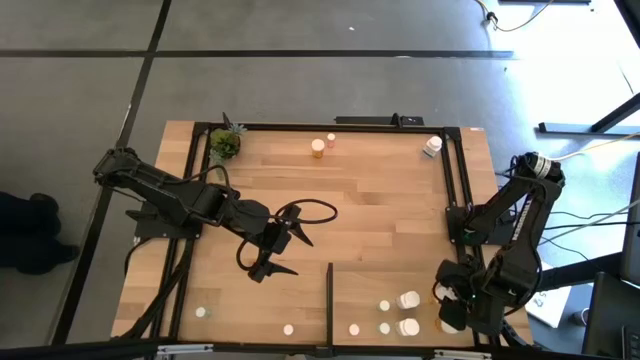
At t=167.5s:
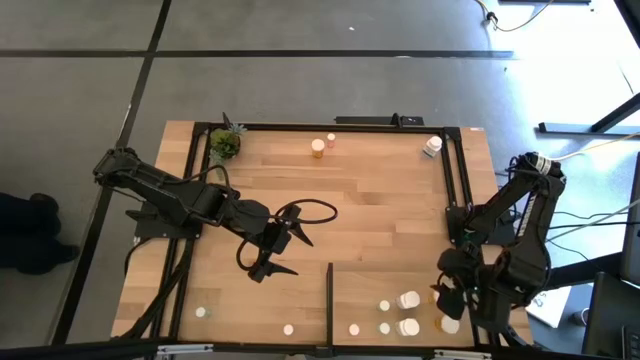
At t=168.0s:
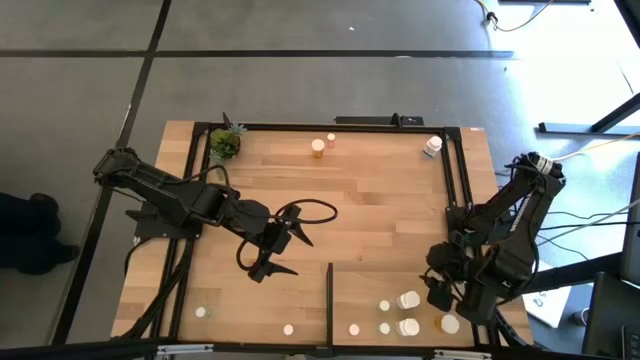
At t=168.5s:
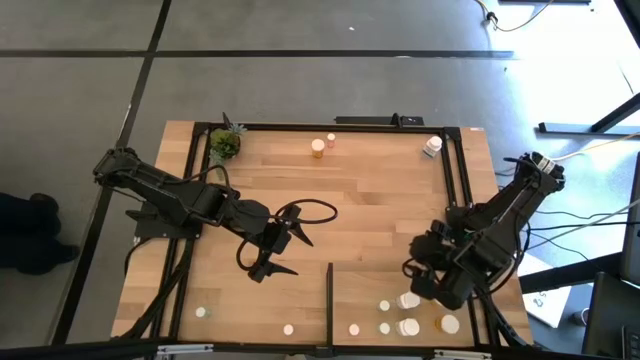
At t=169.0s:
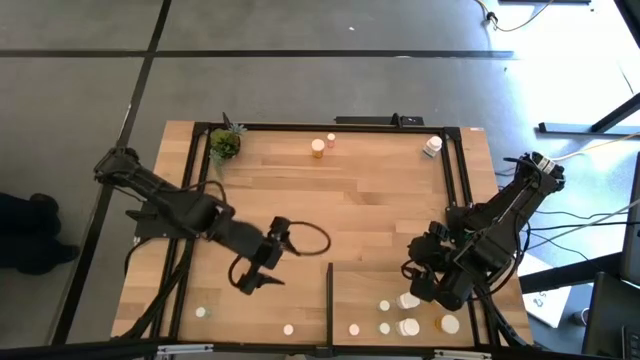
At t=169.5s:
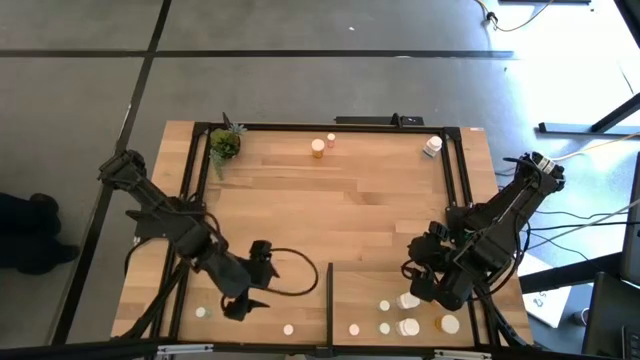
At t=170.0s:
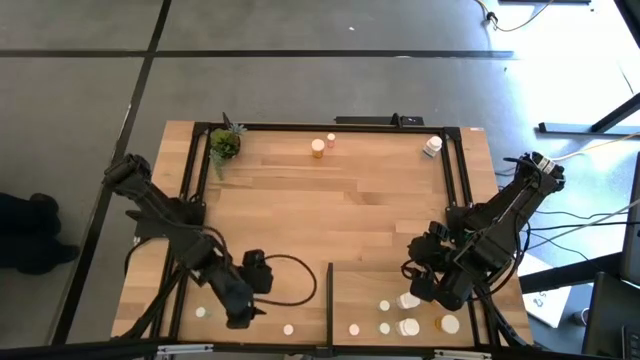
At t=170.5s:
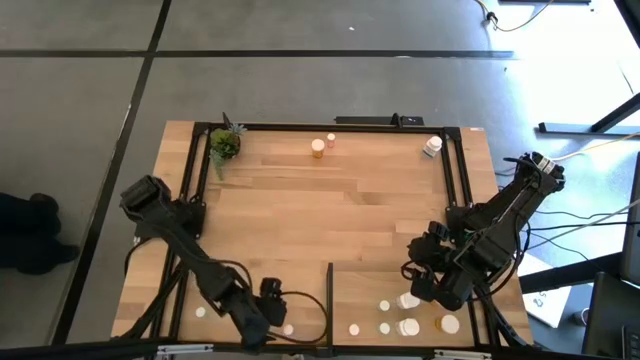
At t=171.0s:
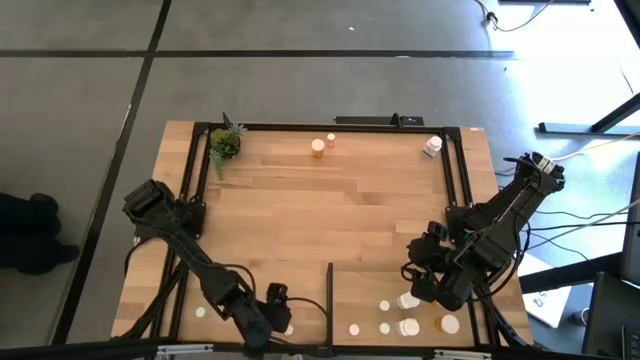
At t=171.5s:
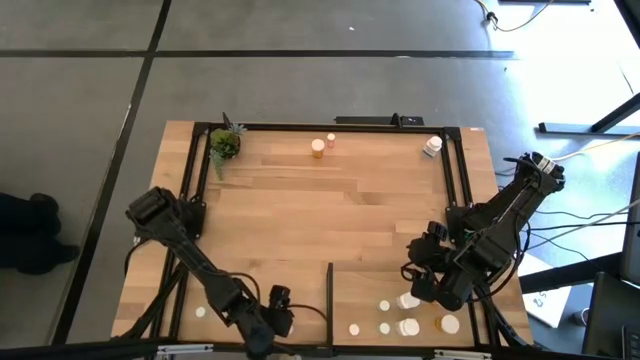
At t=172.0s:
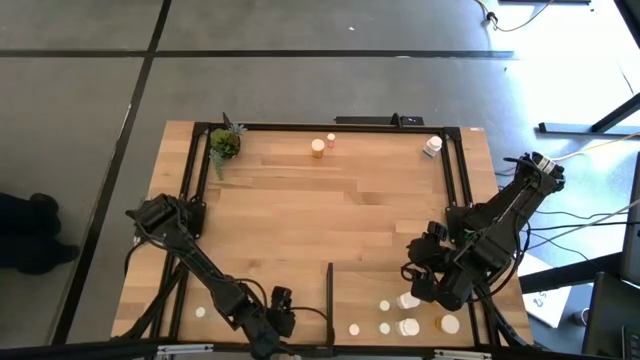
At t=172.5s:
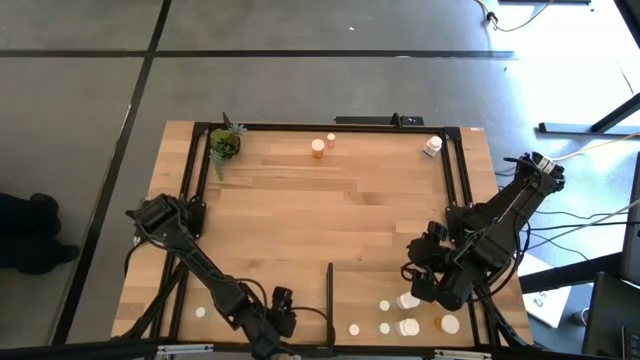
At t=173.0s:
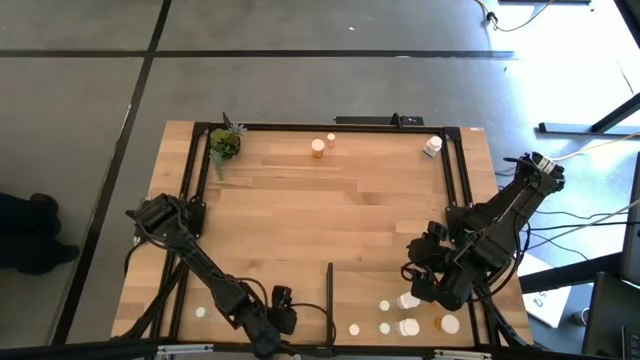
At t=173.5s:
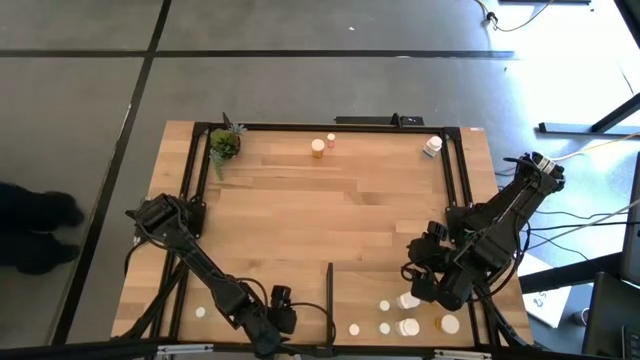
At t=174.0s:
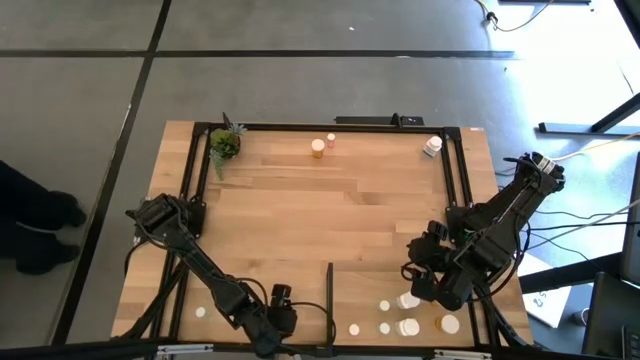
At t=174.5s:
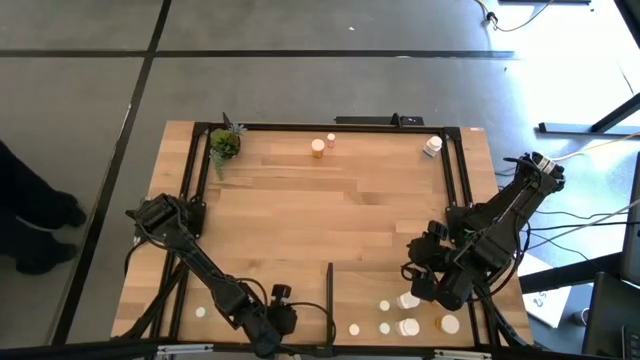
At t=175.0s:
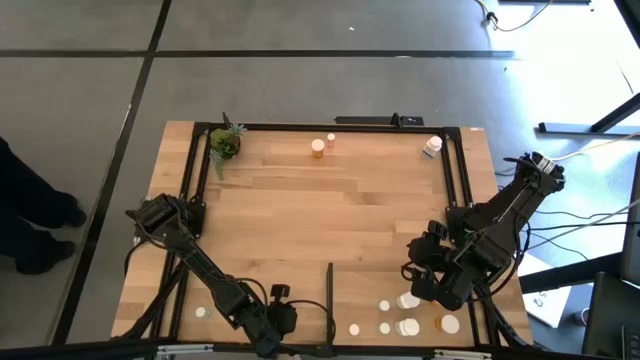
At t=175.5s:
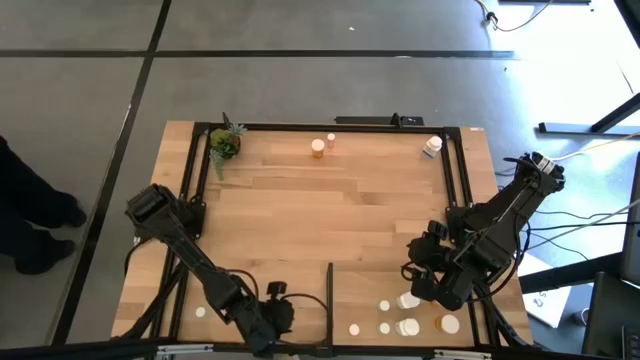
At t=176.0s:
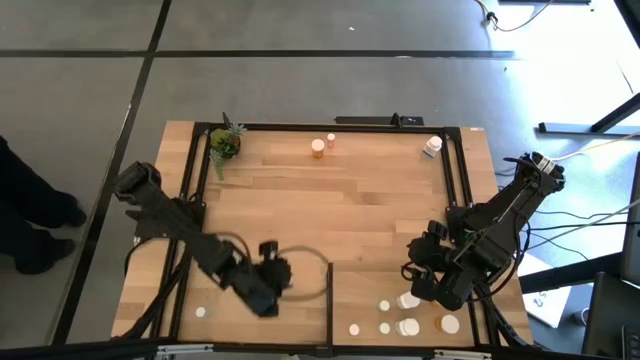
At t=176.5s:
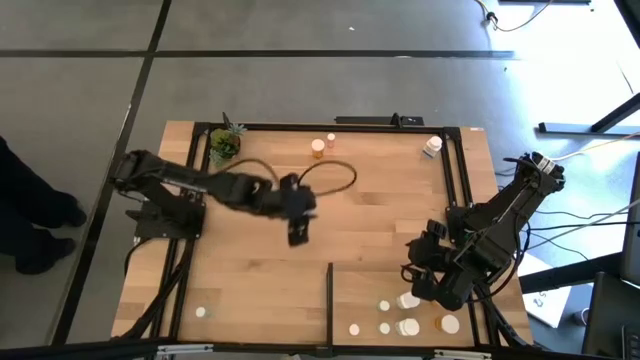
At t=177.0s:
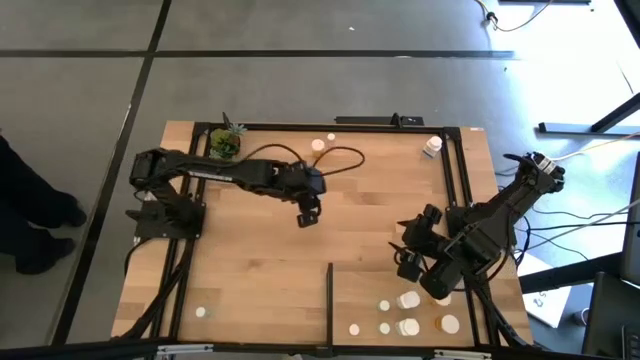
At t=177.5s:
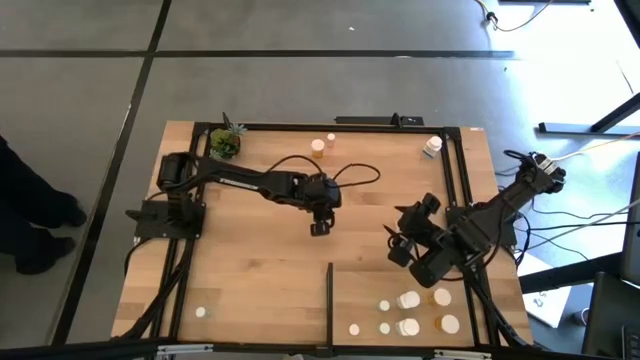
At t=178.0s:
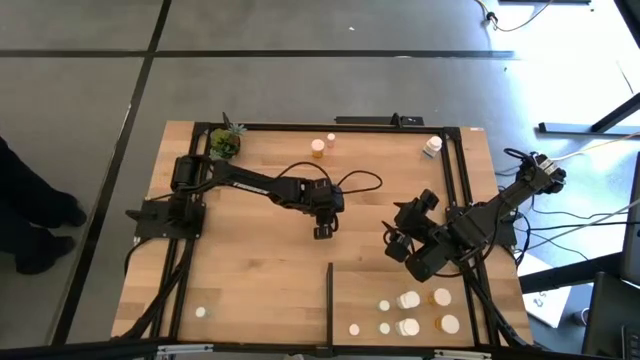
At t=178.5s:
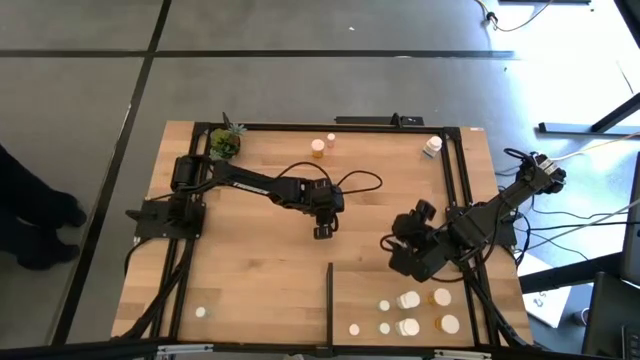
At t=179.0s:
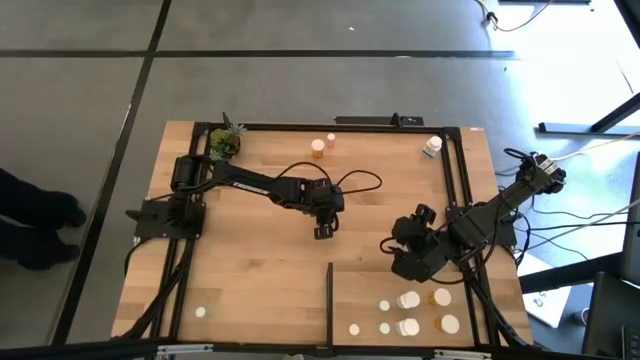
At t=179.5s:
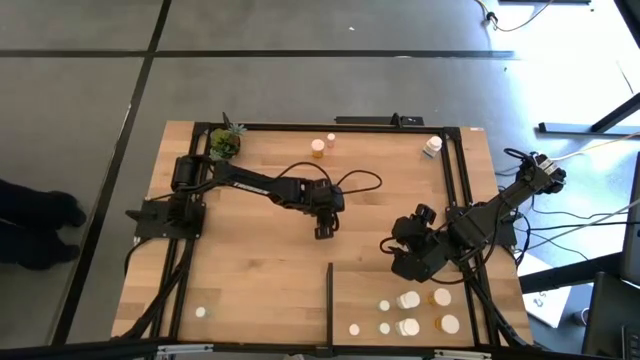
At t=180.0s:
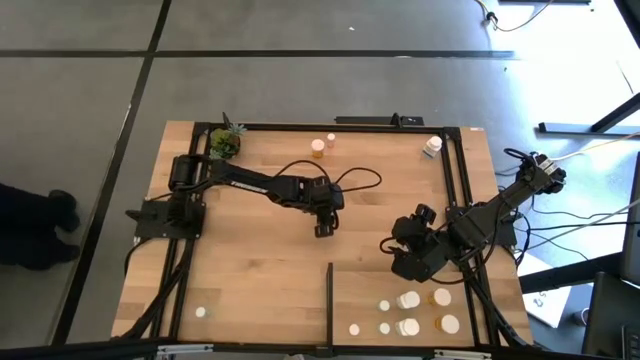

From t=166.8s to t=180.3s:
Task: Pick and place medicine bottles onto shelf by color
Put the bottom pink pill bottle on the shelf aligned with the other pink pill bottle

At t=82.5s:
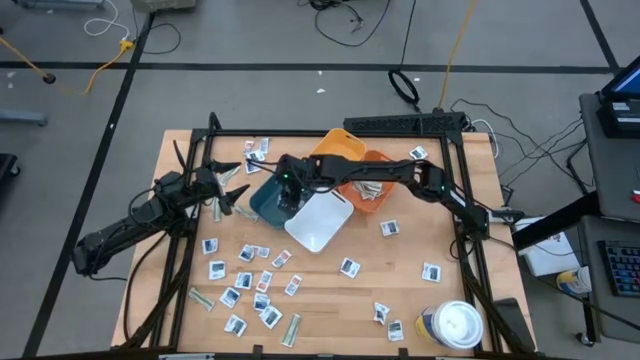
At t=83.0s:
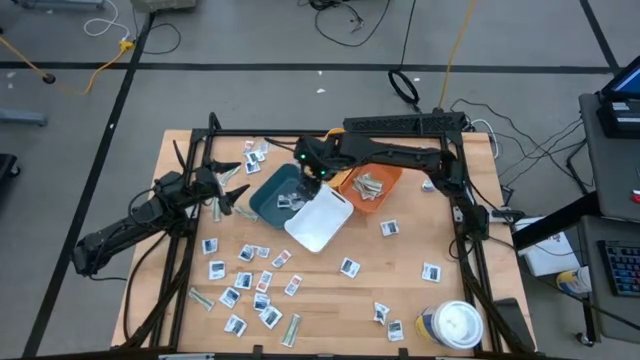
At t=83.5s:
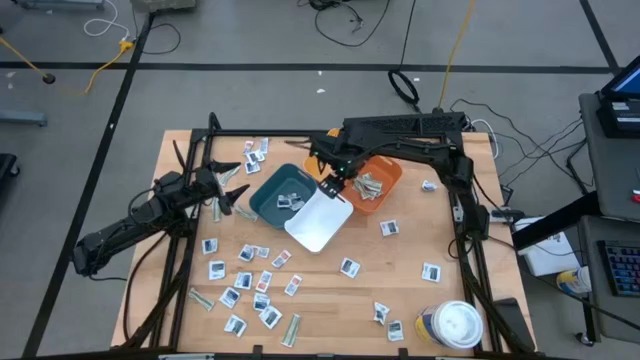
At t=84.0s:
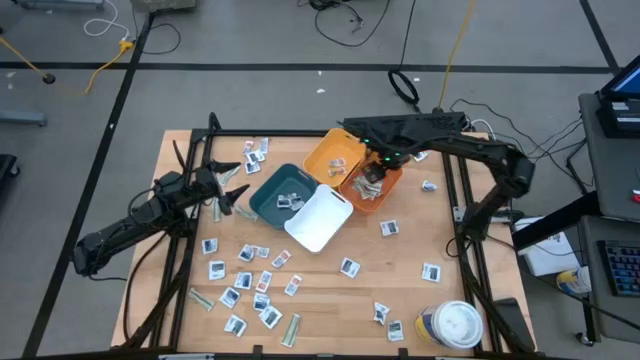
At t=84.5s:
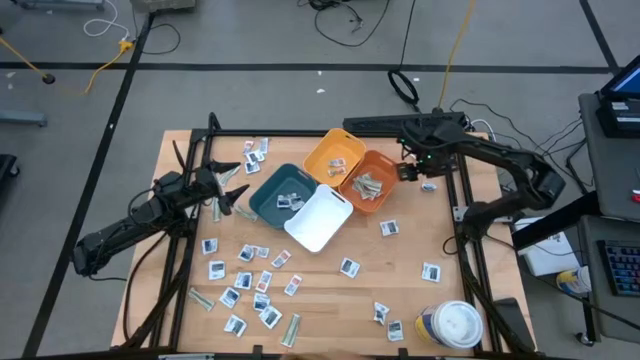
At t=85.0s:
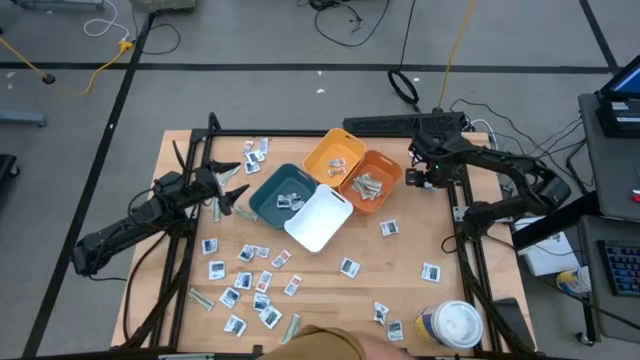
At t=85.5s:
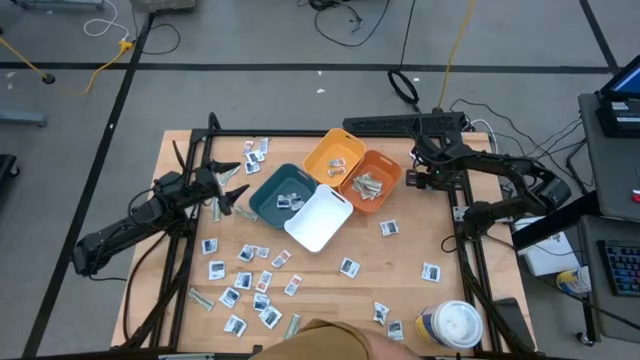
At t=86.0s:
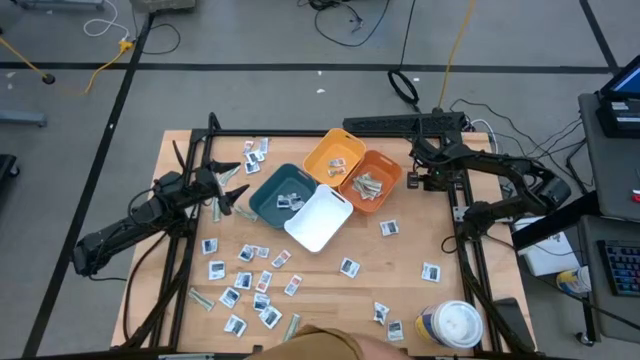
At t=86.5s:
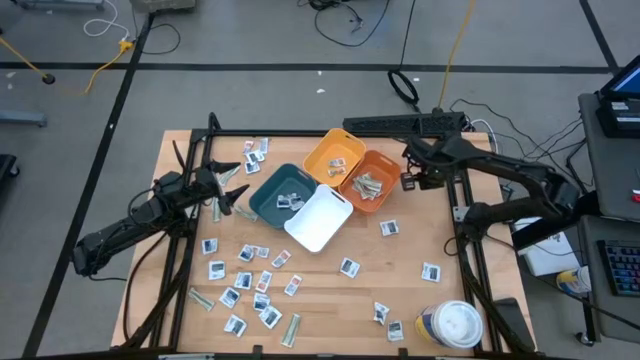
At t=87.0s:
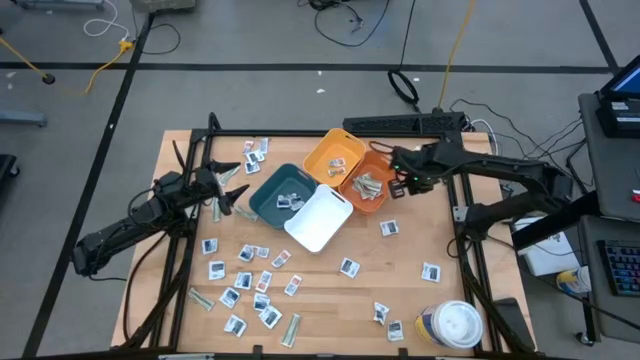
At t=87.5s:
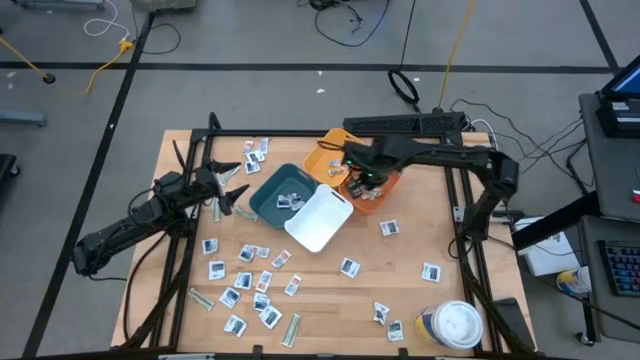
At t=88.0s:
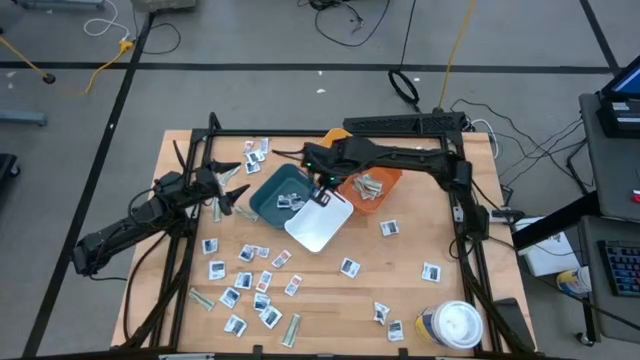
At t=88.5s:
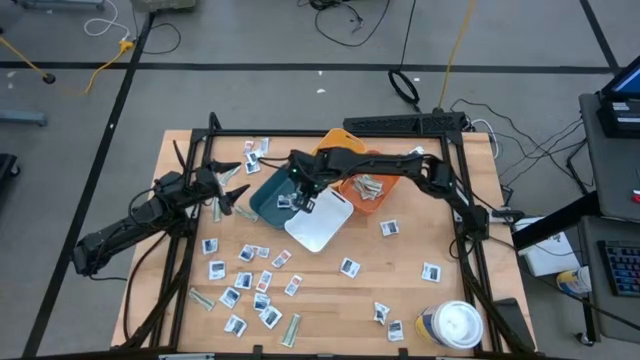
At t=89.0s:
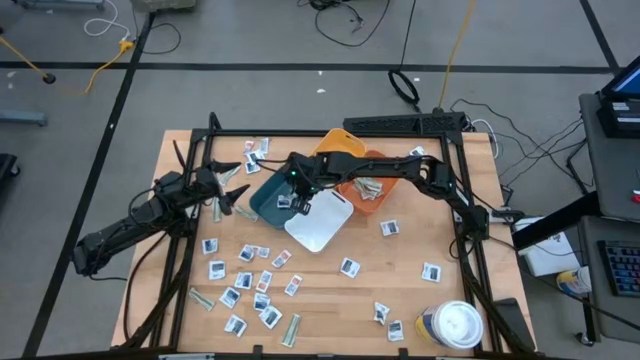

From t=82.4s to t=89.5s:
Task: Pick & Place First Aid Supplies
Put the blue alcohol pad into the blue bin
